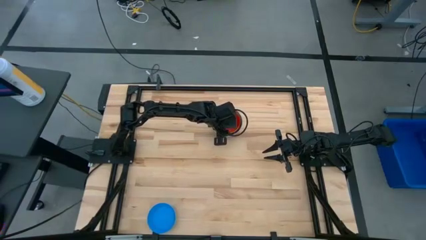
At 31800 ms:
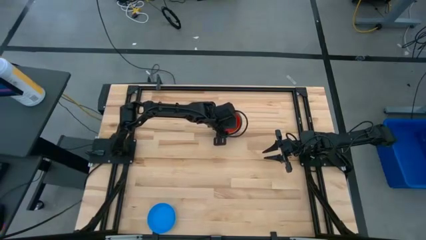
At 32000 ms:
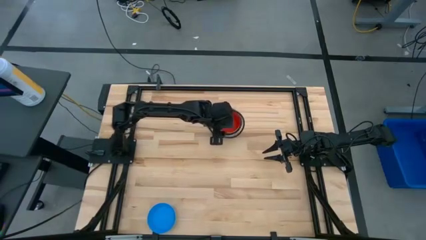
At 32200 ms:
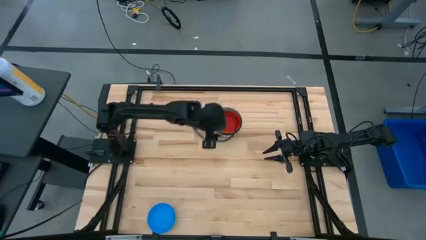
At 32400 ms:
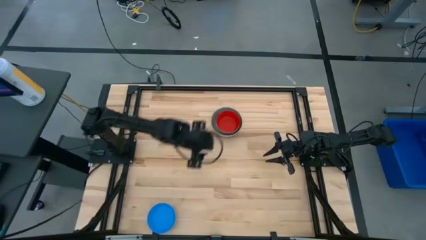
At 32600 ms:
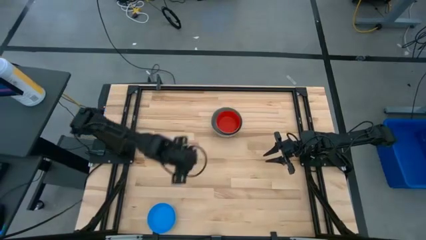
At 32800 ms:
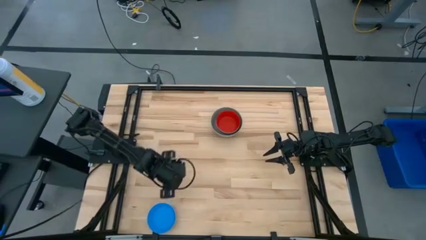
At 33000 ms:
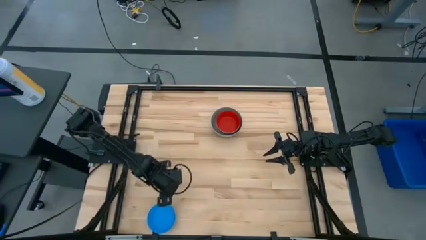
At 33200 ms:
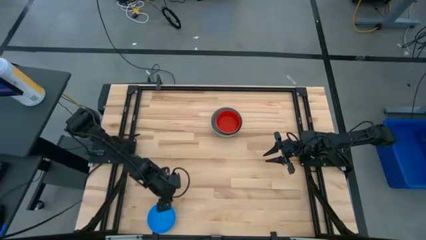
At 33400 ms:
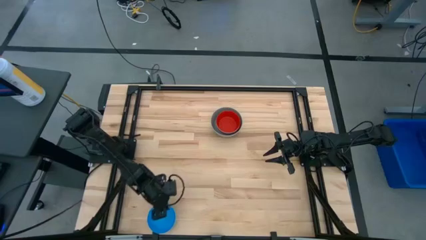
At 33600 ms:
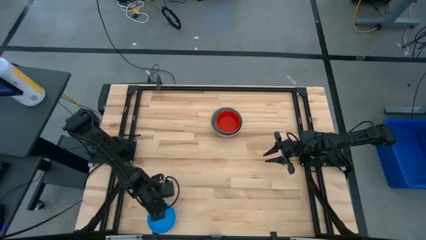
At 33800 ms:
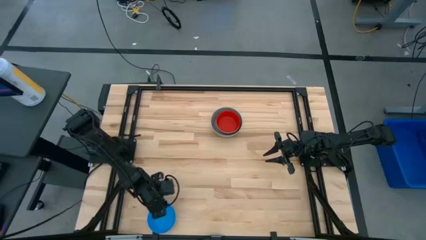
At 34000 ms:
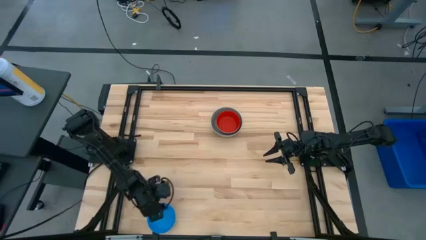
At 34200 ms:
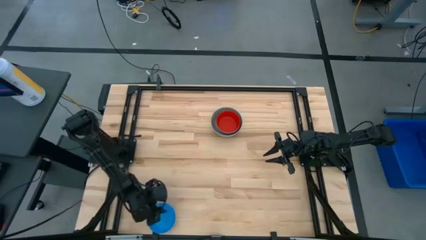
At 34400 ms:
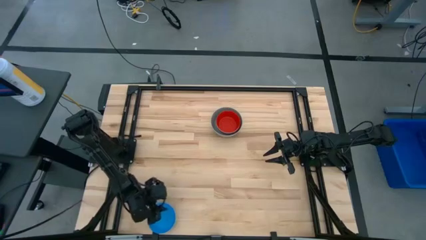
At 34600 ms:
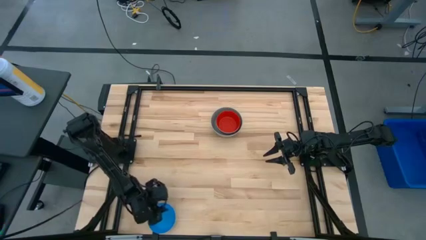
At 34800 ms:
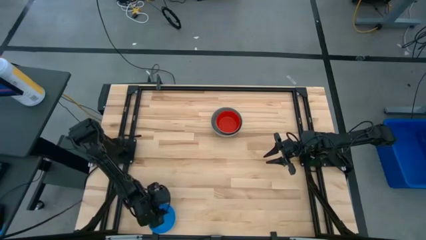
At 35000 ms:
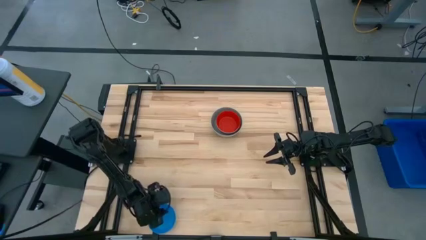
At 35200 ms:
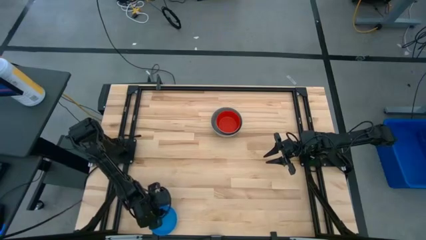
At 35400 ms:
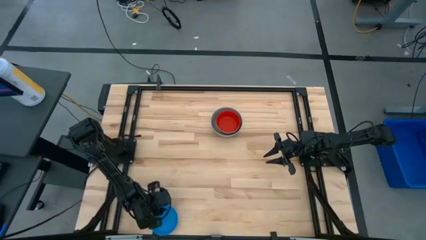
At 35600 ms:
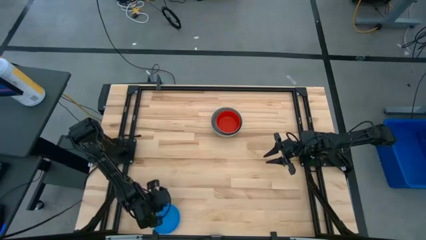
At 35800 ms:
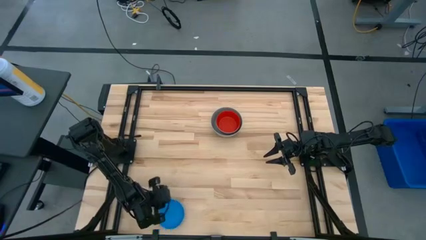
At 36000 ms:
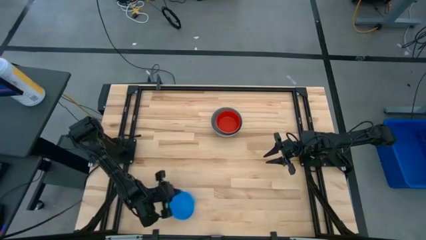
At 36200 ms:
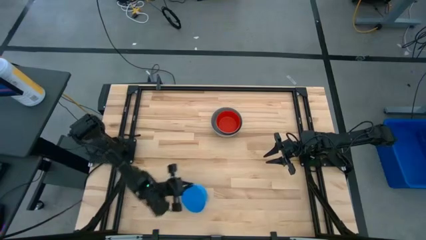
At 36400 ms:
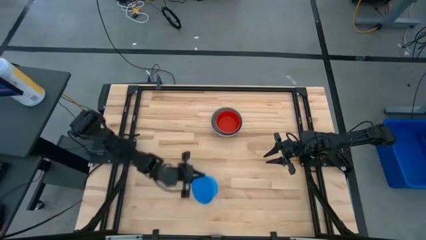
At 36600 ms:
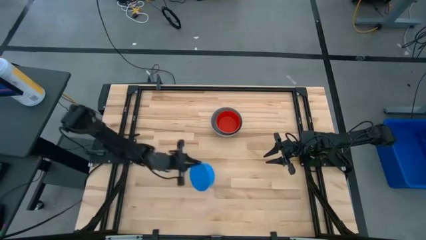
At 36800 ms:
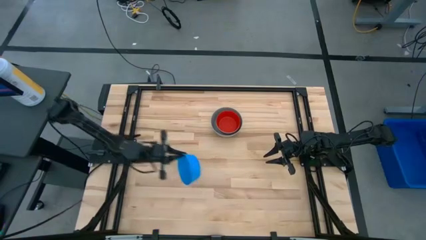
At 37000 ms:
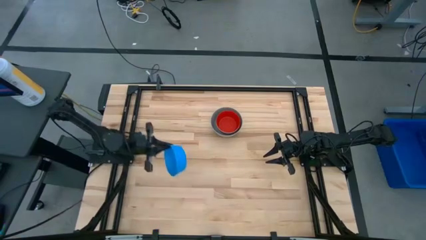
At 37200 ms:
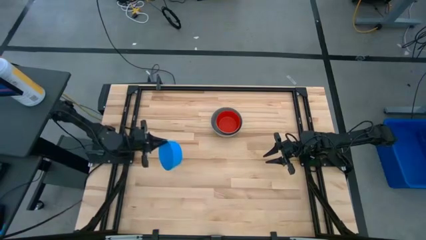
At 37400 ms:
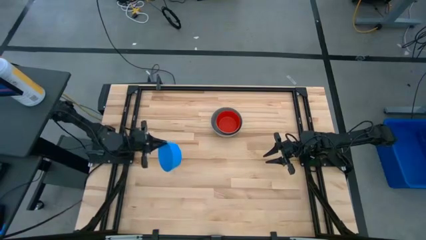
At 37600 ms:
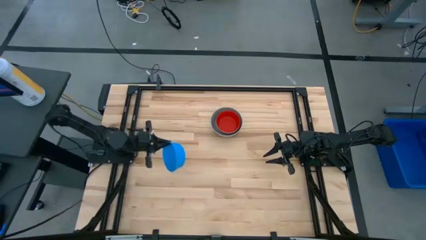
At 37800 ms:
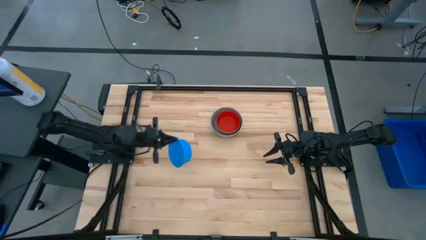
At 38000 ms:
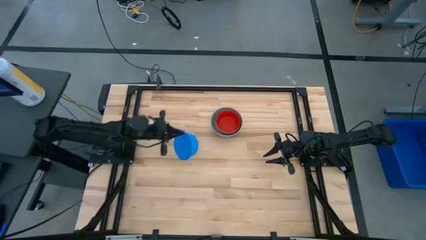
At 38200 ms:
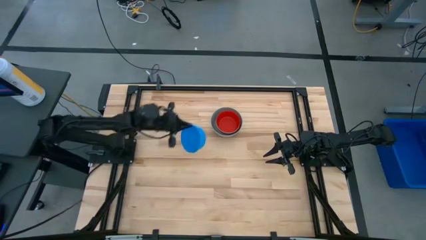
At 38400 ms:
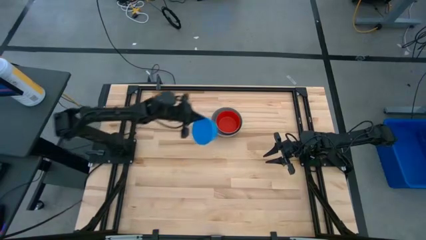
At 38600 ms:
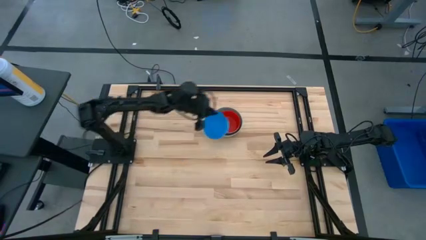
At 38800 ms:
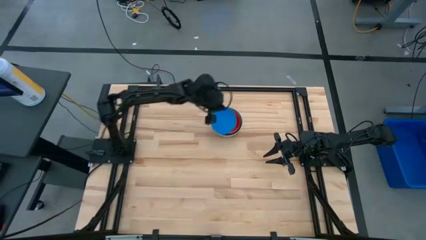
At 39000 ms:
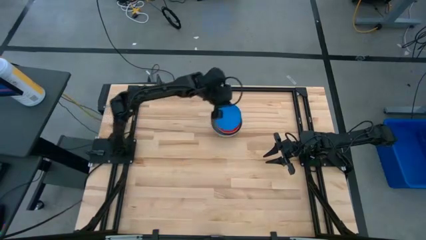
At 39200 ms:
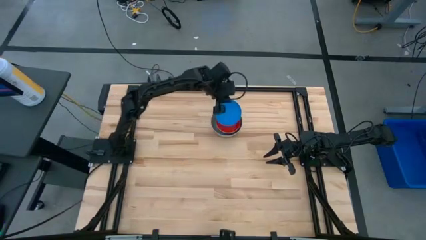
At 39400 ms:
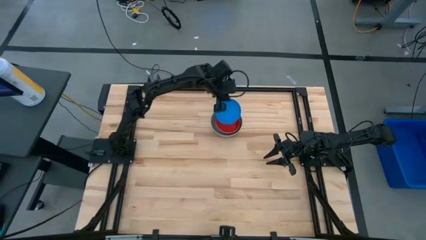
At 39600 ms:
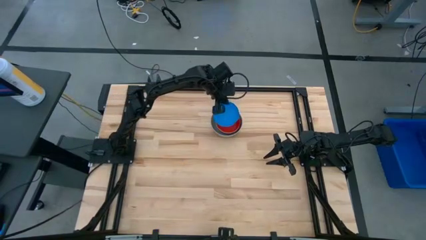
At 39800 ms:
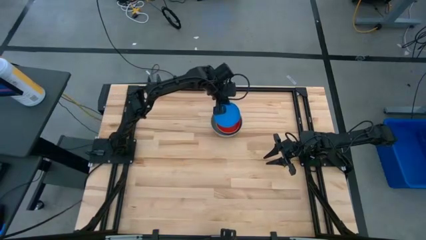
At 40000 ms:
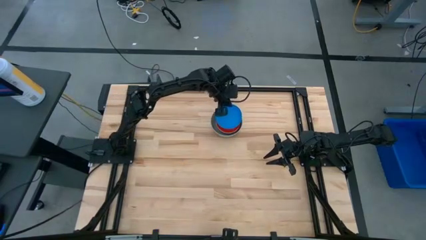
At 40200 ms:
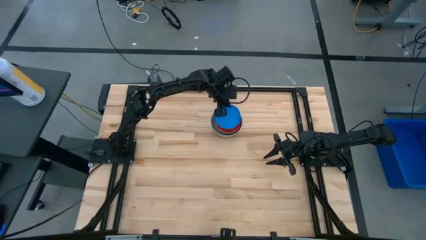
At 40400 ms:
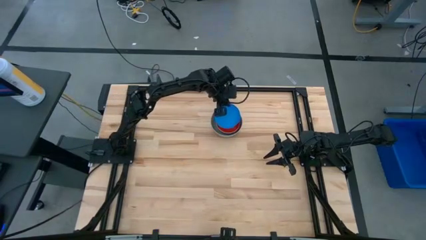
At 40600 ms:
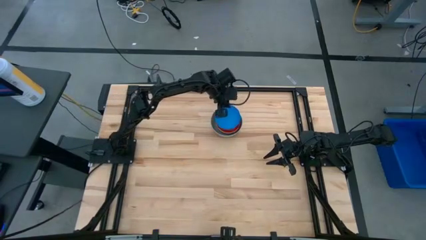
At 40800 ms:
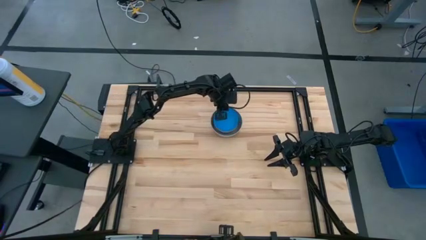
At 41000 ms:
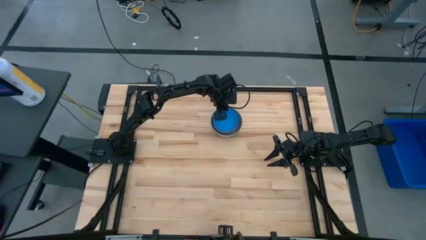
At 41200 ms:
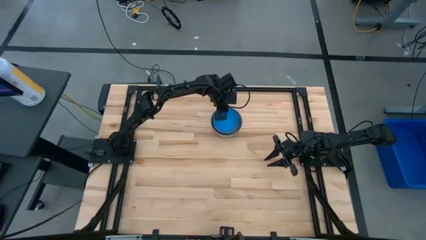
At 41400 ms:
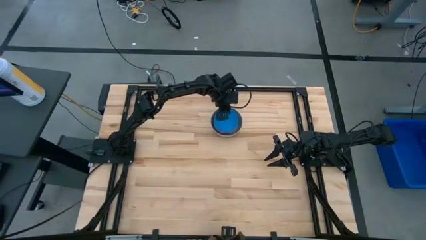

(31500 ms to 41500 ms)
Stack the light blue bowl on top of the red bowl

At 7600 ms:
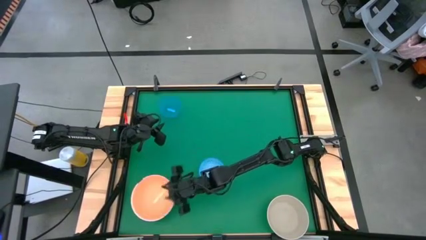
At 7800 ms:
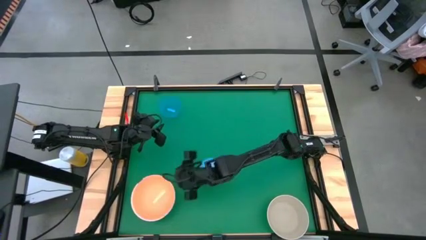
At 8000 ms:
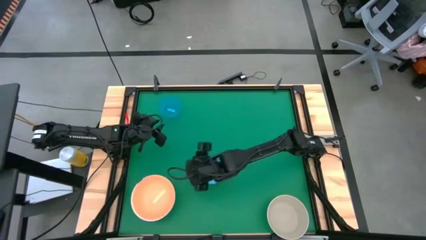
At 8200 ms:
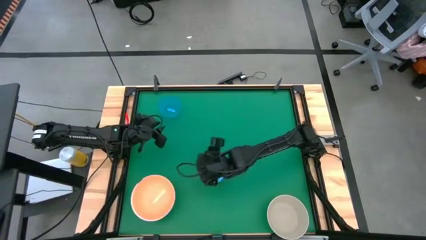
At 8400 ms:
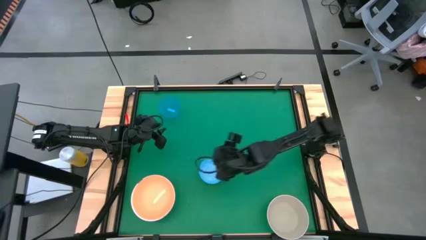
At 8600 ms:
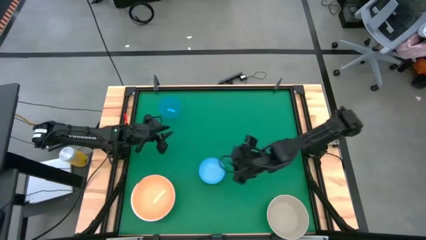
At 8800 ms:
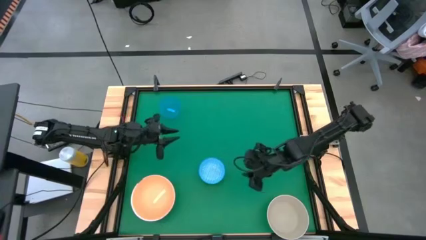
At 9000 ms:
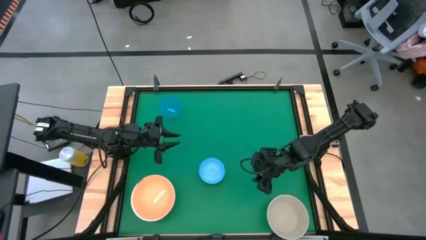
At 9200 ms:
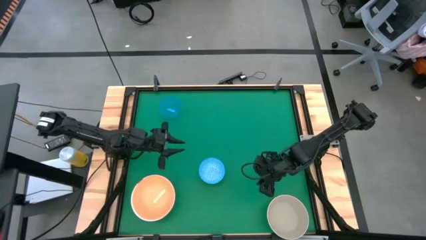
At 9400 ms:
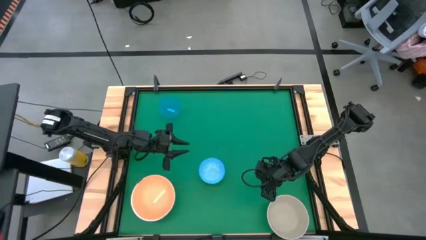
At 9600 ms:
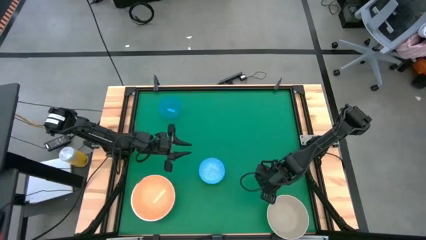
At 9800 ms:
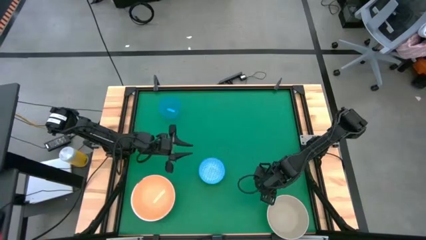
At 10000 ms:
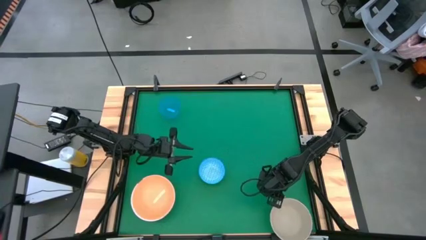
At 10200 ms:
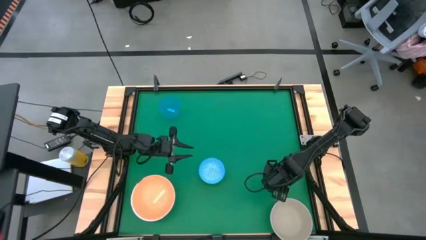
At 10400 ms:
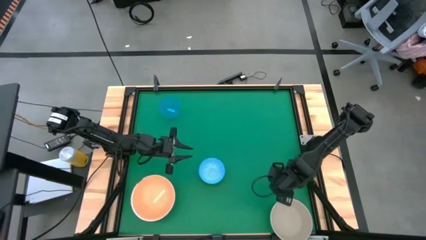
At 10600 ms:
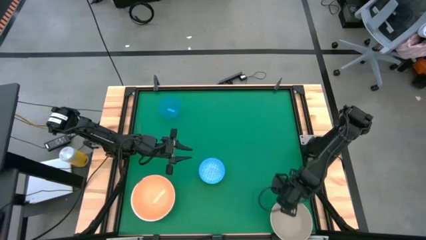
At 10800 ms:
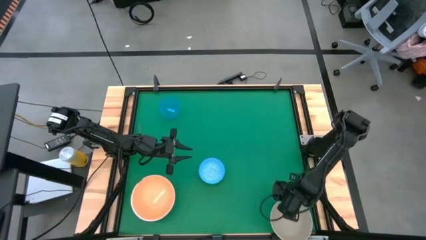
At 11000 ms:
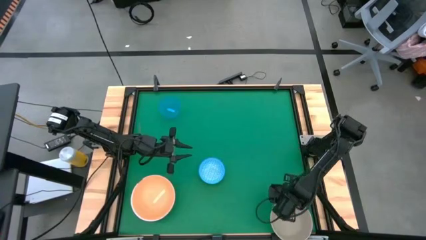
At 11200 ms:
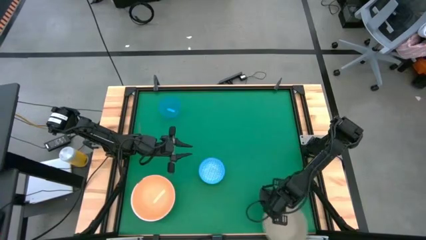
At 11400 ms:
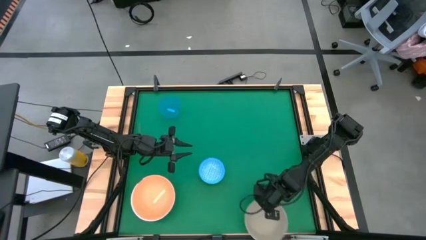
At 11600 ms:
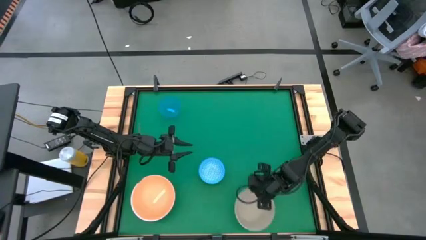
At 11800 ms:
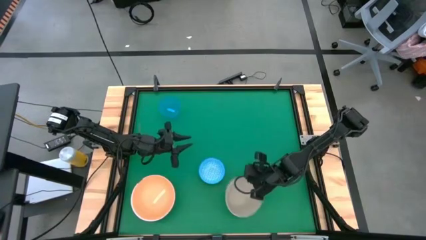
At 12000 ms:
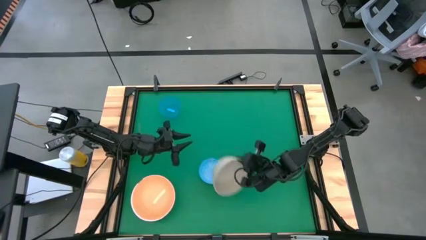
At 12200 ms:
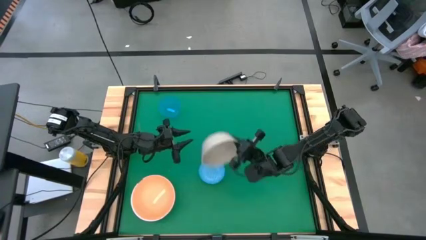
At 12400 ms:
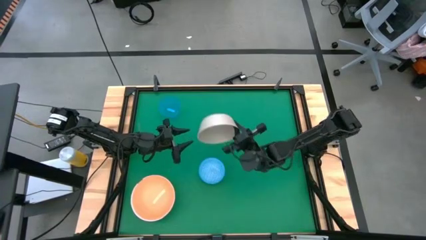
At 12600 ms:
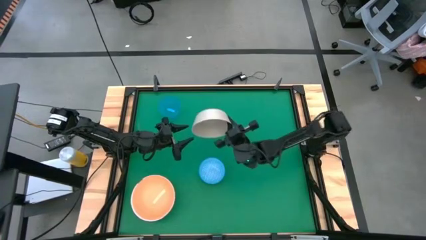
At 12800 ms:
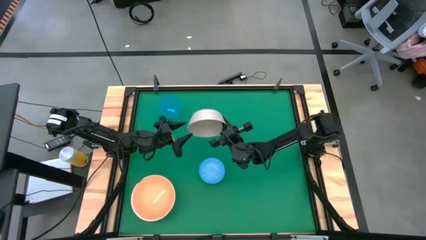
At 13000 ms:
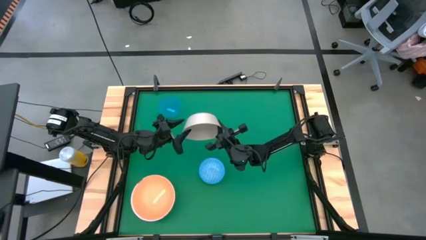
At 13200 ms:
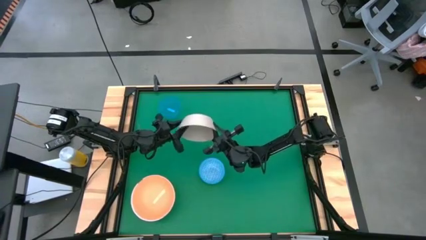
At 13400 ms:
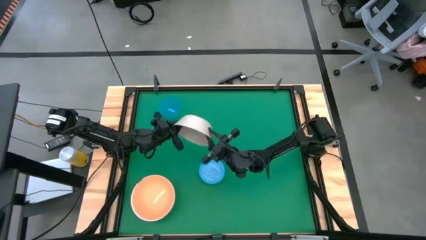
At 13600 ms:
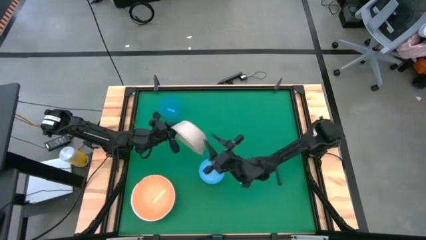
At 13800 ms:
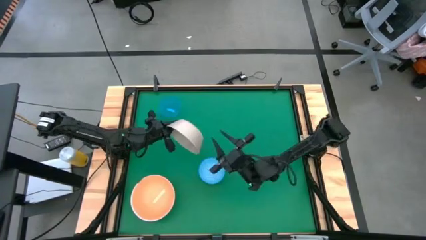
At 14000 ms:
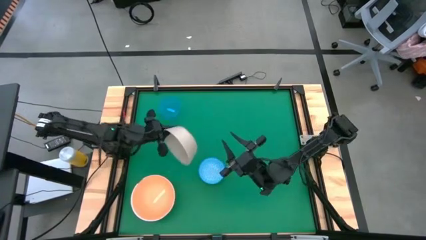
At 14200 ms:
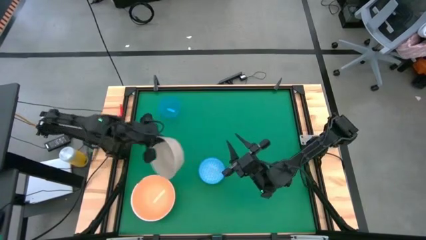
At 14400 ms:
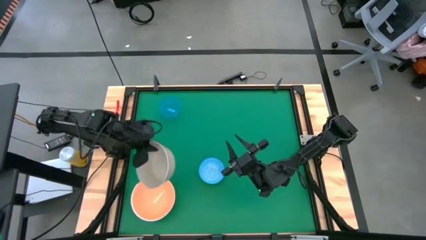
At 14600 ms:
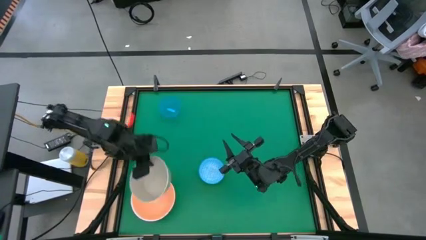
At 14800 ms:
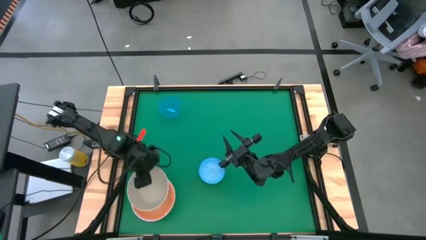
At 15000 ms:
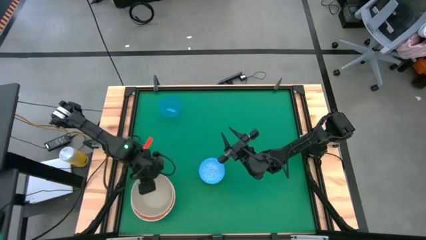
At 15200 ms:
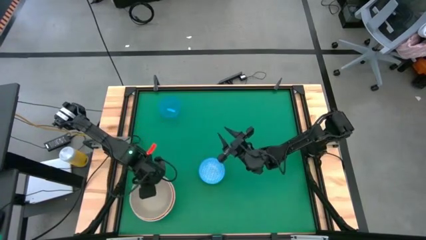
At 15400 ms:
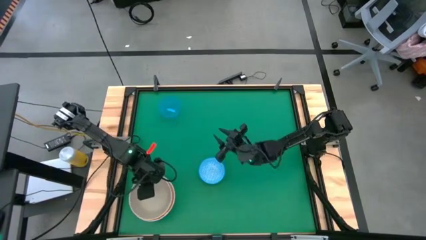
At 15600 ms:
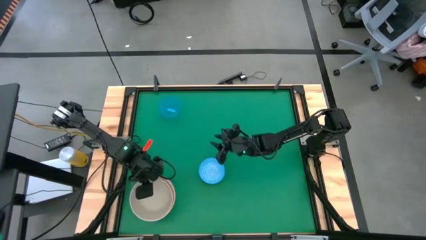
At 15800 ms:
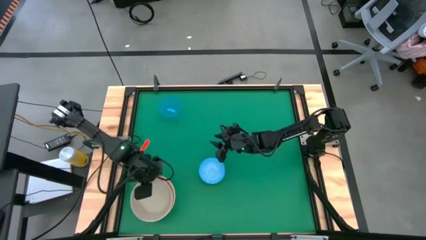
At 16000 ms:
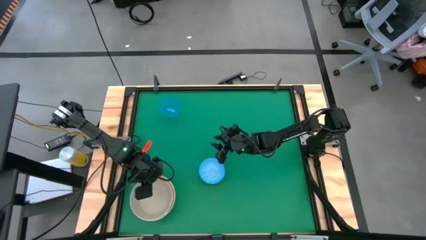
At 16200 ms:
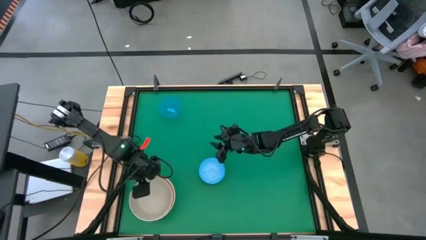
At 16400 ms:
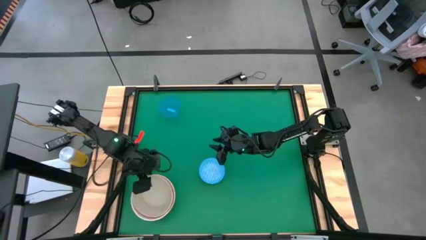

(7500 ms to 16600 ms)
Stack the brown bowl on top of the orange bowl
